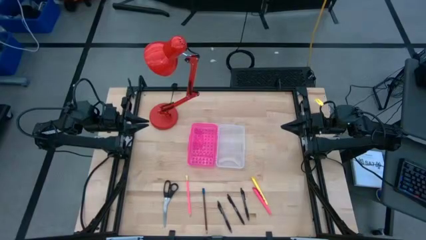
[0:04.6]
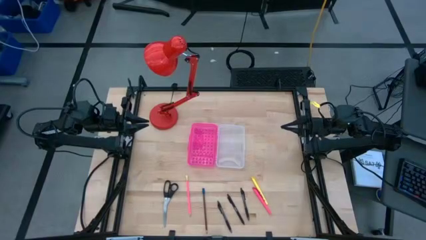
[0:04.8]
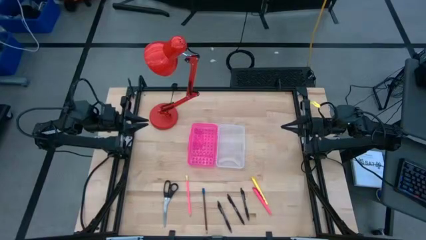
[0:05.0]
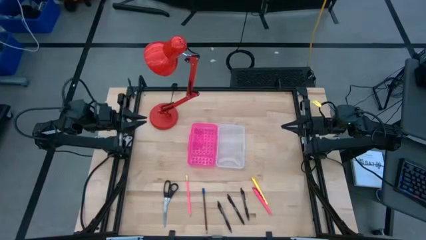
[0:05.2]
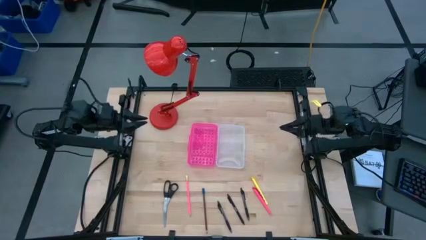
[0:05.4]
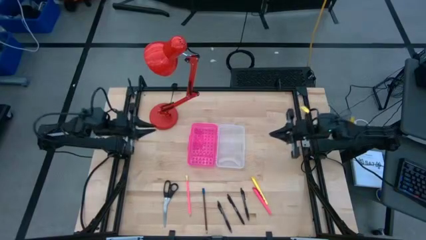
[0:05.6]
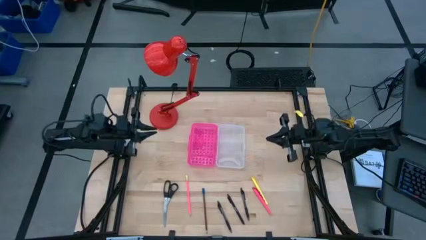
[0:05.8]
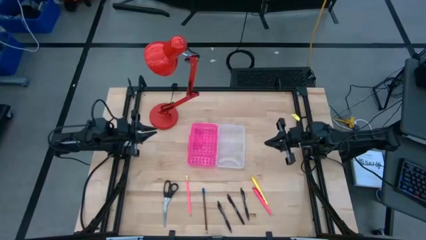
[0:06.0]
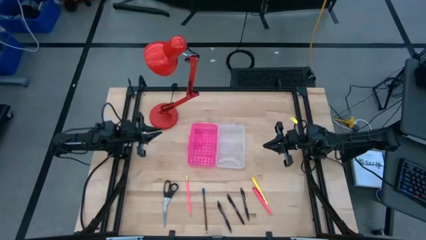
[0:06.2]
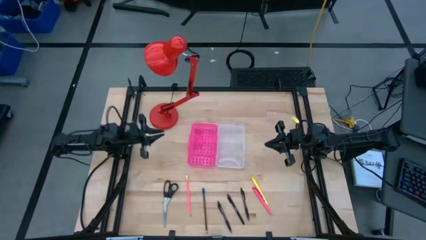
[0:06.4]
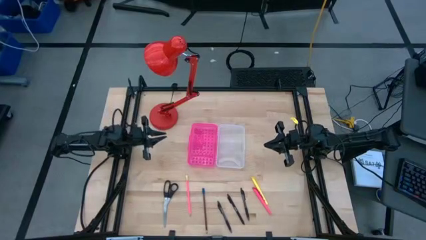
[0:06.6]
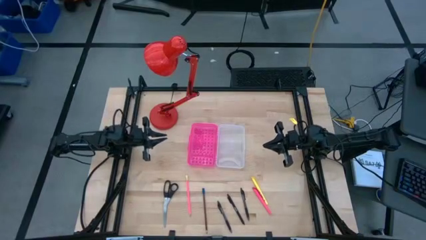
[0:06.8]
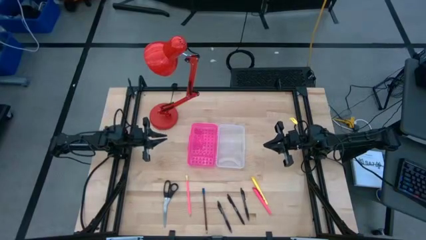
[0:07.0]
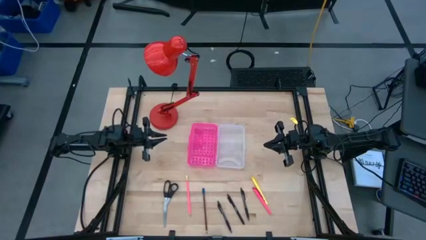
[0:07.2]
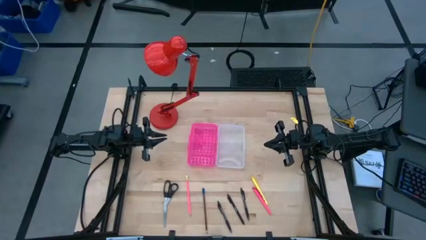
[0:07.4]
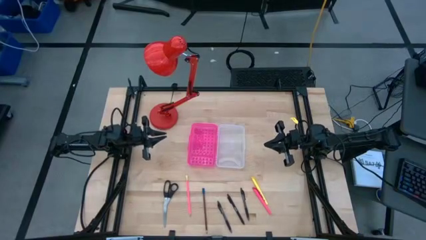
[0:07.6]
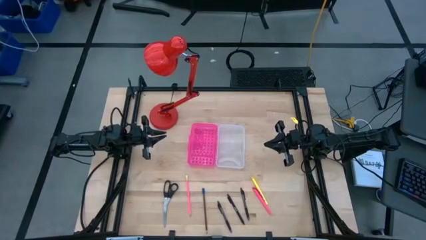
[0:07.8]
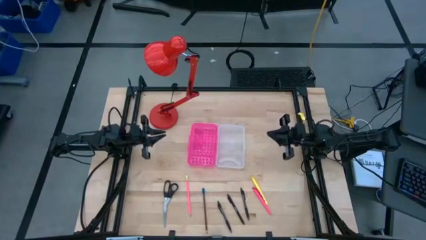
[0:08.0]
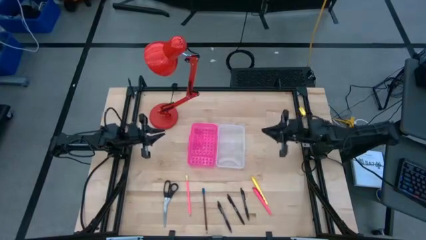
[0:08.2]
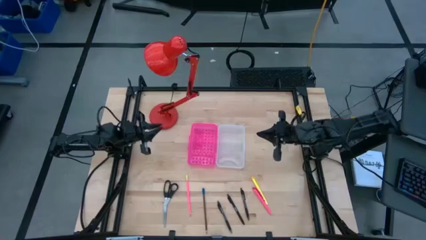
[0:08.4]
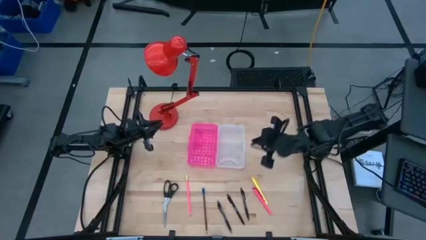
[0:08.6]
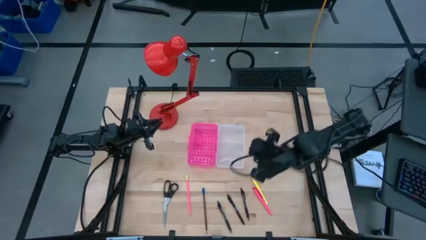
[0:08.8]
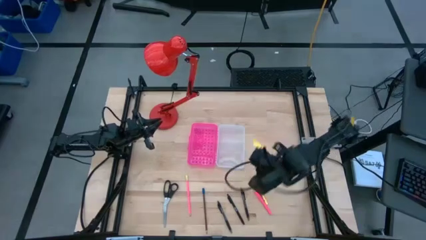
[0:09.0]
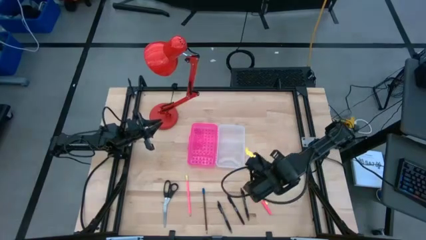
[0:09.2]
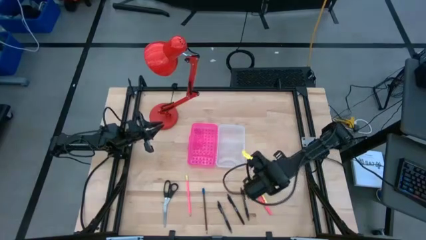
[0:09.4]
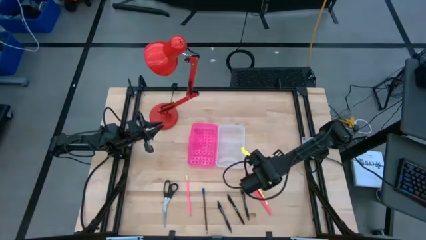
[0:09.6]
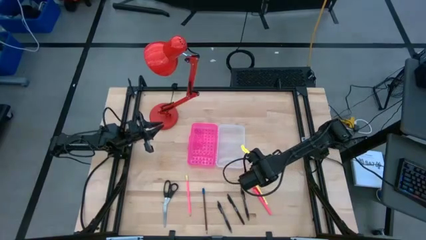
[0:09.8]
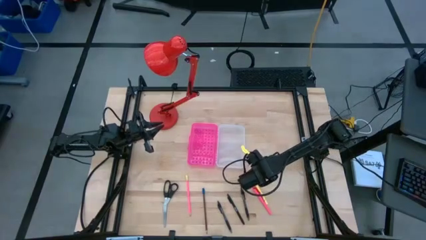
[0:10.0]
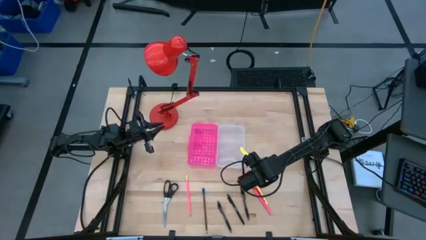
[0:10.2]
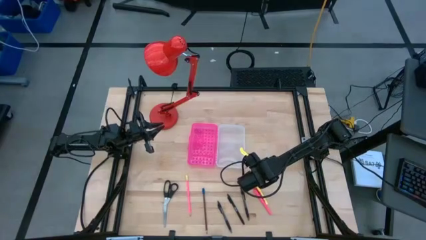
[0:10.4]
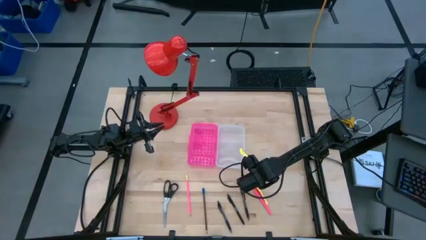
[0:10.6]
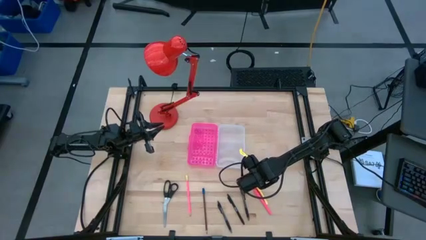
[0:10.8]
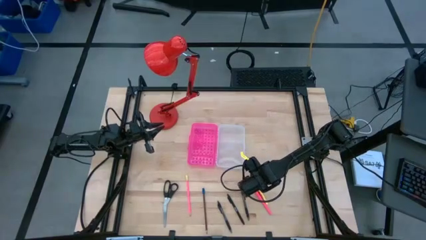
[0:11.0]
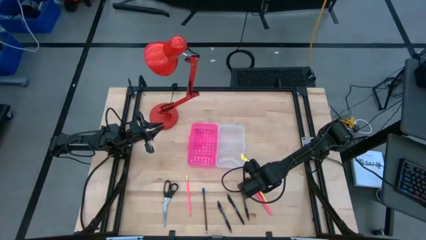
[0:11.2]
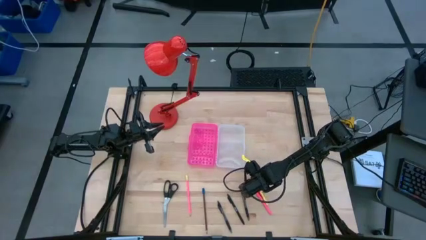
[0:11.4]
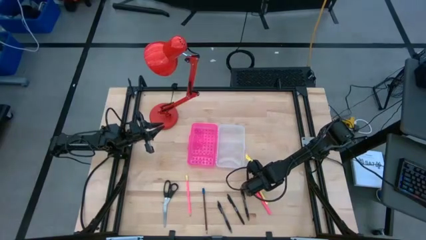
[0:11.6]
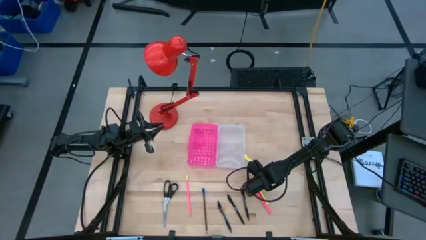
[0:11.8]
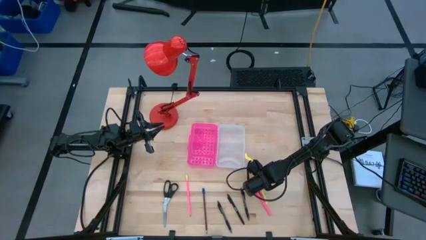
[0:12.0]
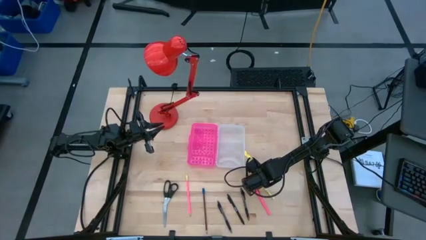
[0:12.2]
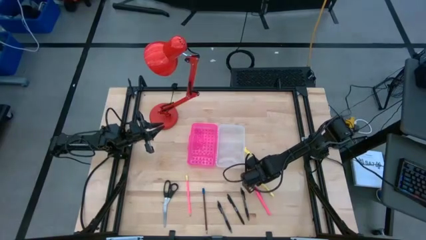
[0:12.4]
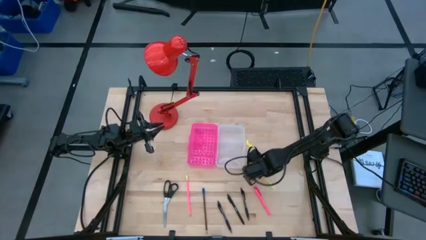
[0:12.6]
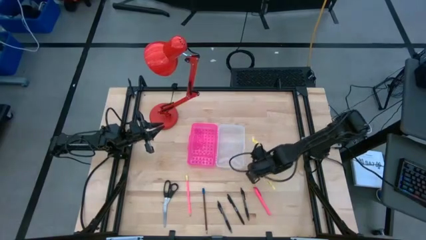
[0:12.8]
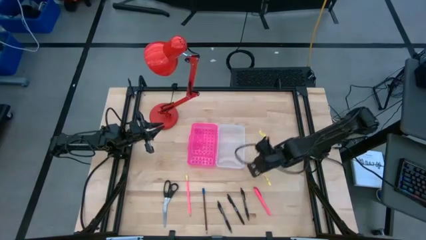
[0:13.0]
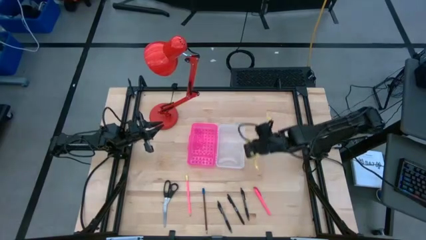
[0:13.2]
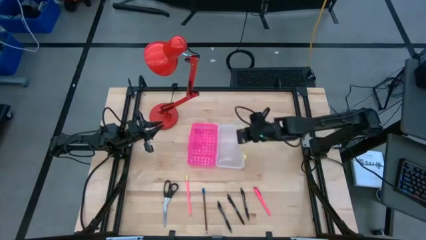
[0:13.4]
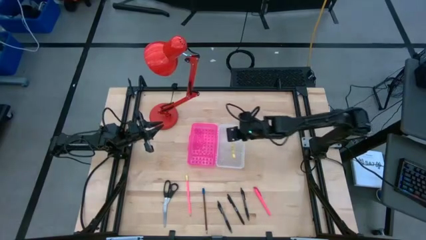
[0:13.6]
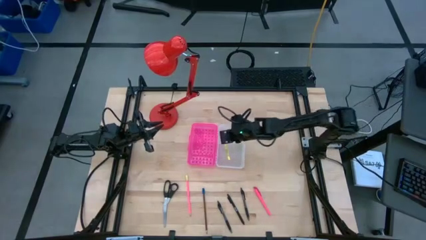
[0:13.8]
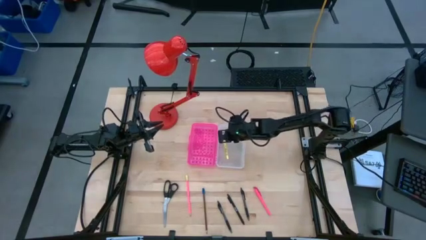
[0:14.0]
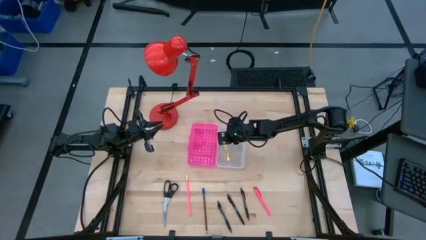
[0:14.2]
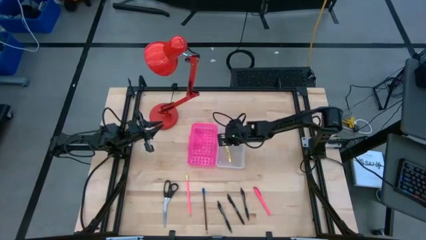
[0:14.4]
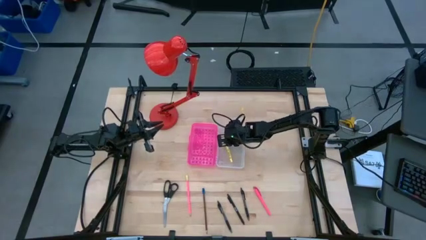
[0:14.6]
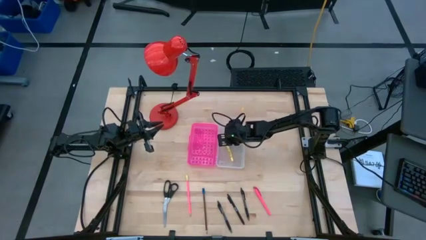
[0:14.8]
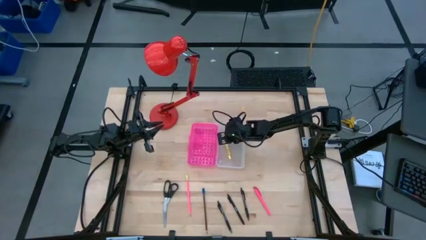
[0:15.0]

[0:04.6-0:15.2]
Task: Pick & place school supplies into a supply box
Put the yellow pen into the supply box

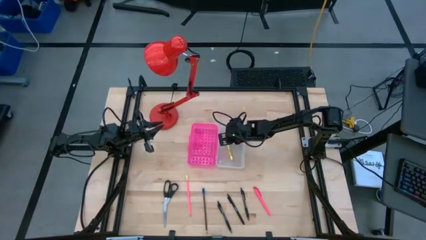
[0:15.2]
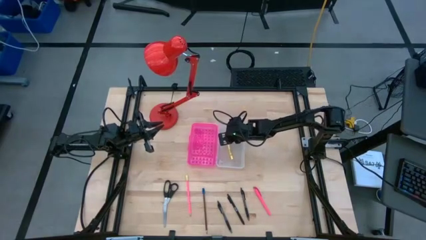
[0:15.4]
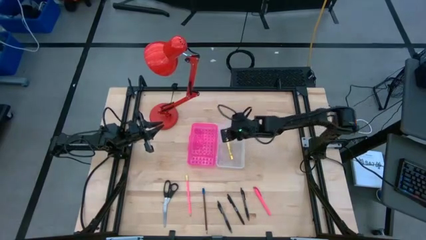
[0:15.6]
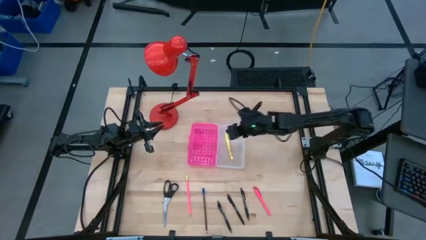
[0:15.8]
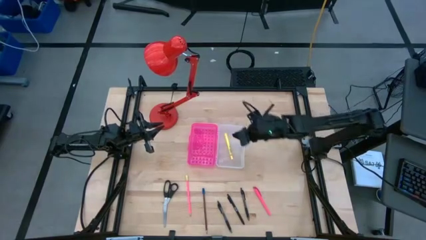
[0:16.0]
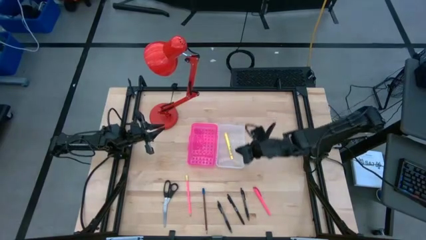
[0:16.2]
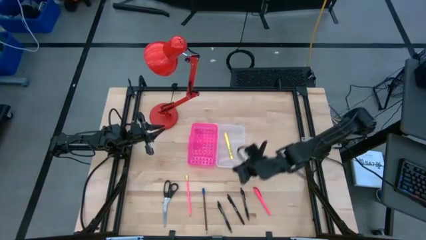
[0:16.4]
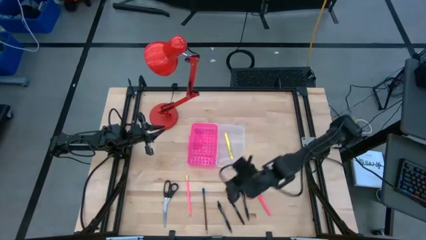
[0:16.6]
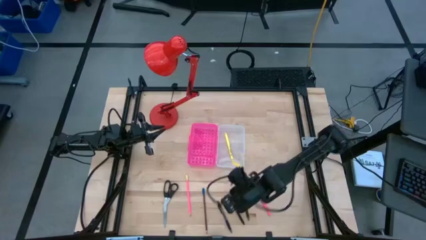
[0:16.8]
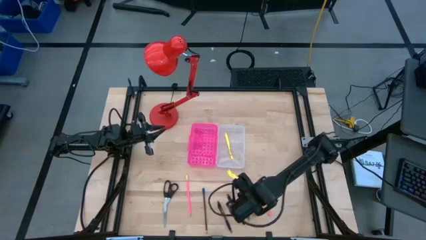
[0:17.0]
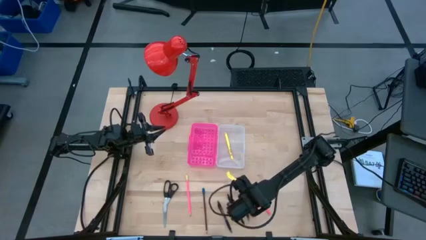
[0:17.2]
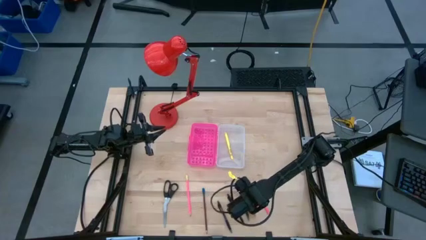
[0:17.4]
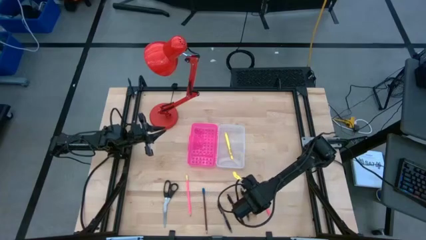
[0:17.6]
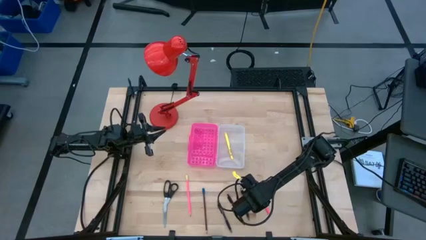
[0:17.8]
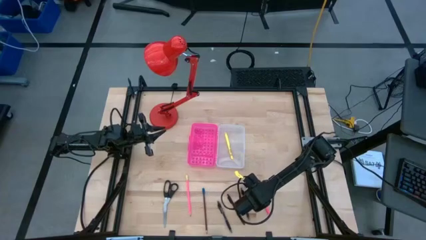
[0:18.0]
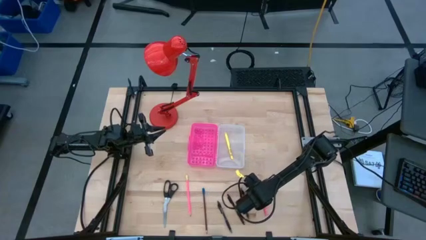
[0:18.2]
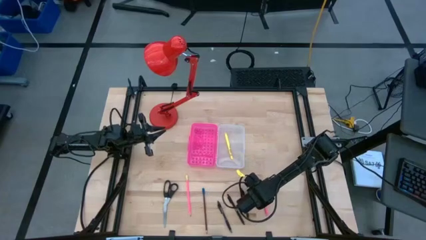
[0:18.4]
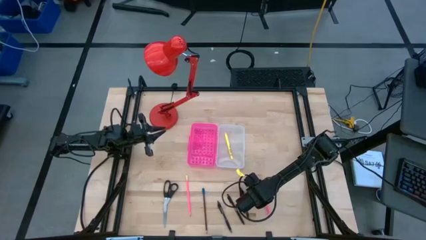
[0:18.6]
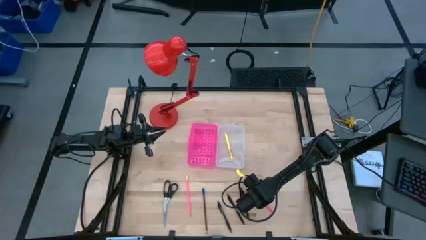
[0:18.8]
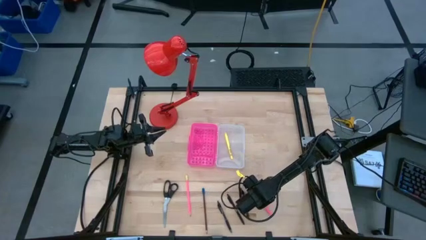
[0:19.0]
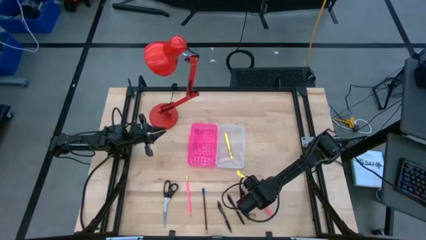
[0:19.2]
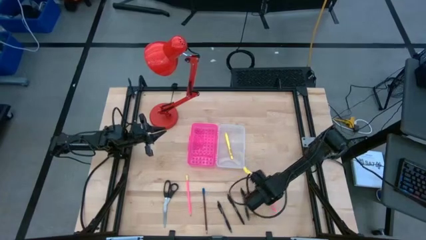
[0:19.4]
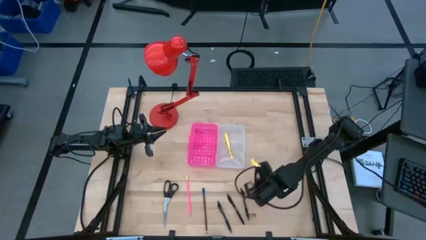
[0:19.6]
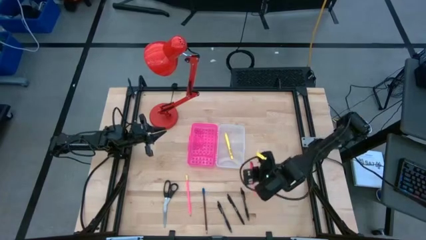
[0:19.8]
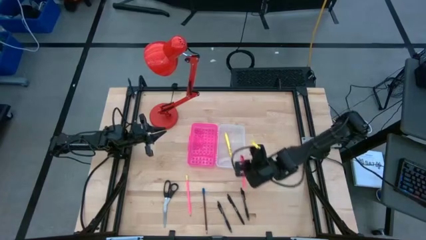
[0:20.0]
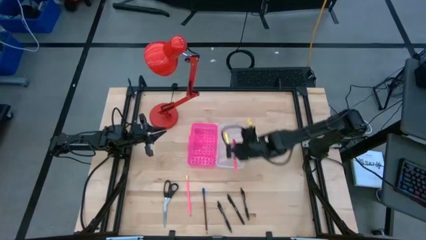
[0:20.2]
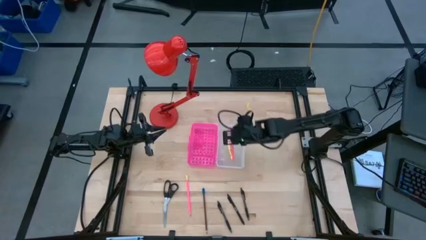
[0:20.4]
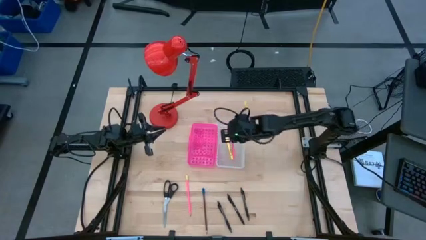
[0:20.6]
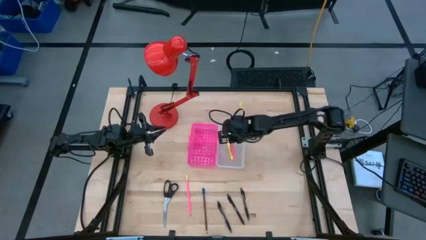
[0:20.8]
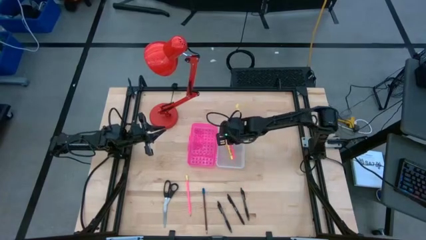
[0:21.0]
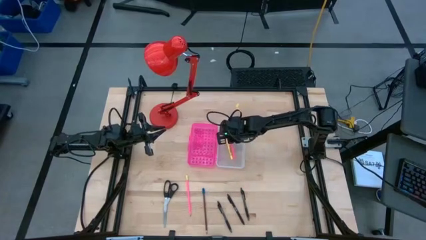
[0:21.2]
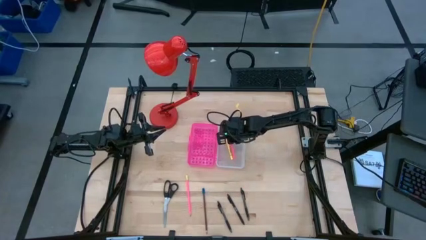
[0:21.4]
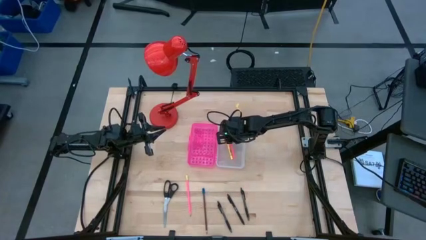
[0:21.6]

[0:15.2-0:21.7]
Put the pink pen into the supply box
